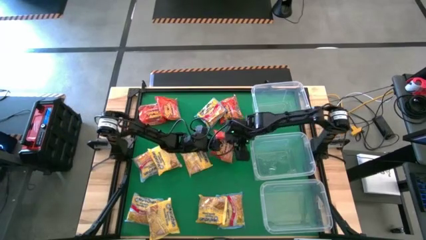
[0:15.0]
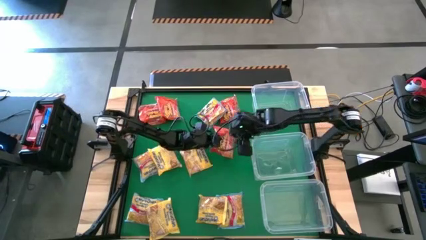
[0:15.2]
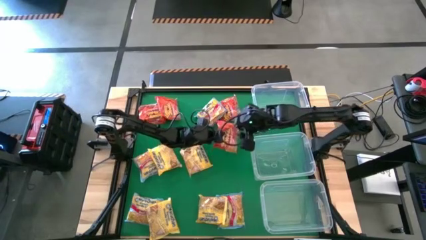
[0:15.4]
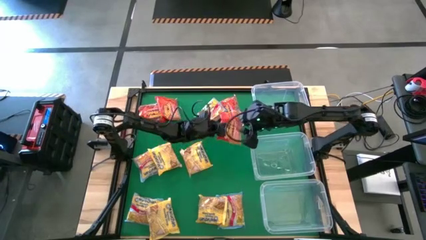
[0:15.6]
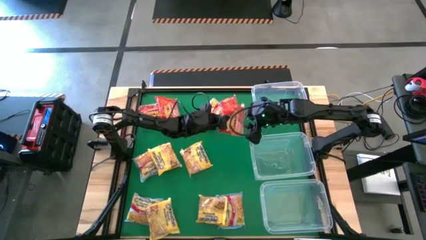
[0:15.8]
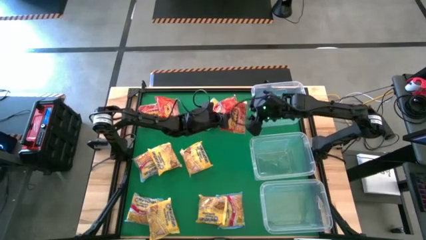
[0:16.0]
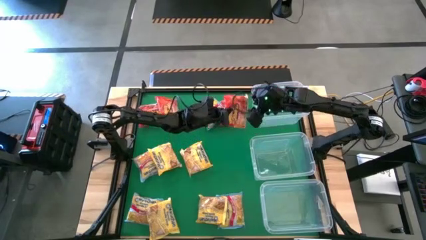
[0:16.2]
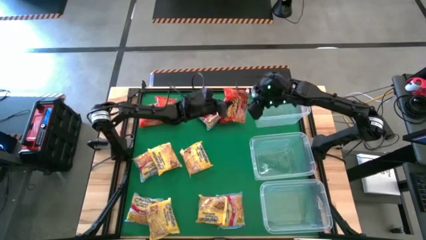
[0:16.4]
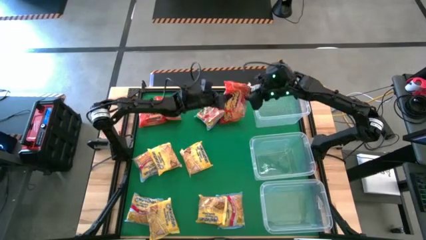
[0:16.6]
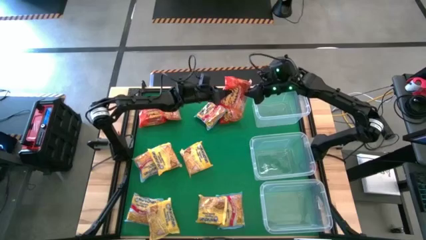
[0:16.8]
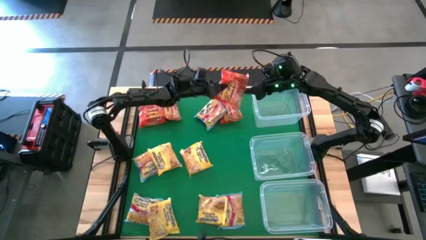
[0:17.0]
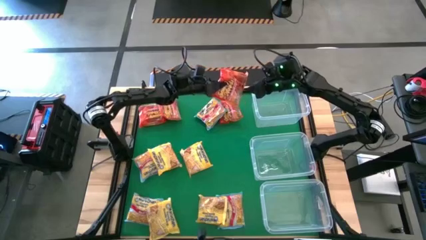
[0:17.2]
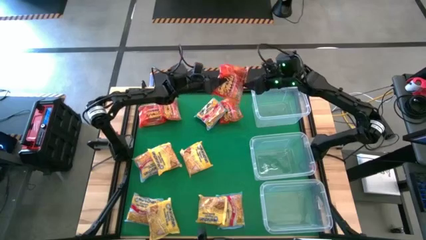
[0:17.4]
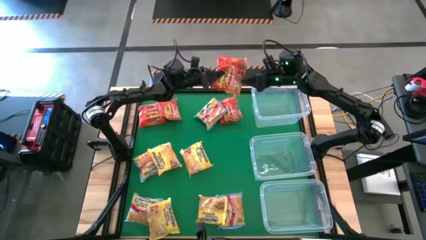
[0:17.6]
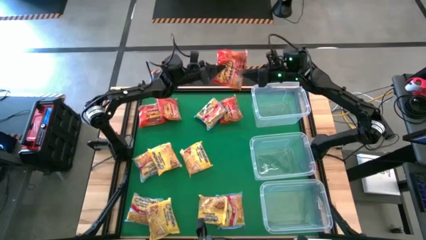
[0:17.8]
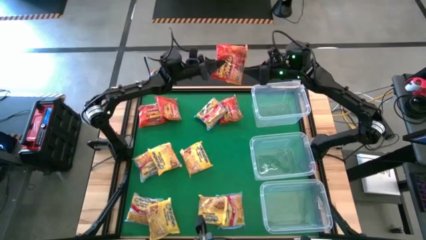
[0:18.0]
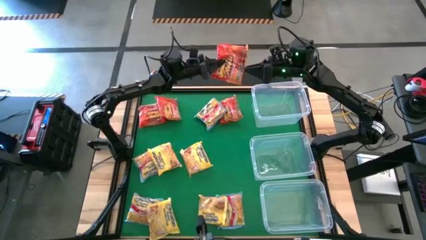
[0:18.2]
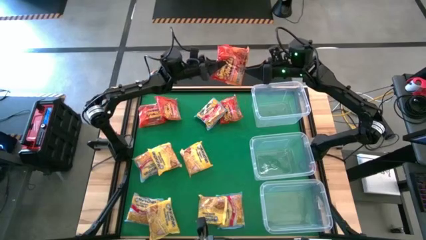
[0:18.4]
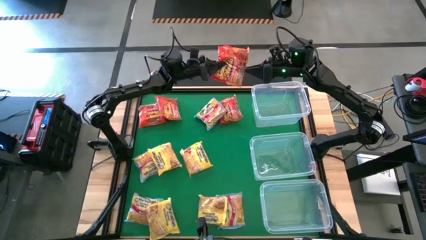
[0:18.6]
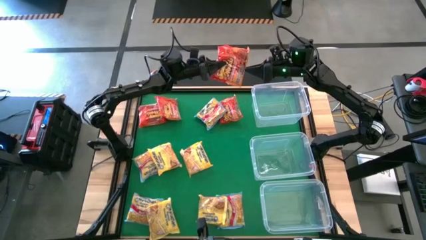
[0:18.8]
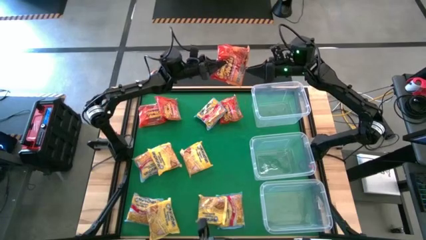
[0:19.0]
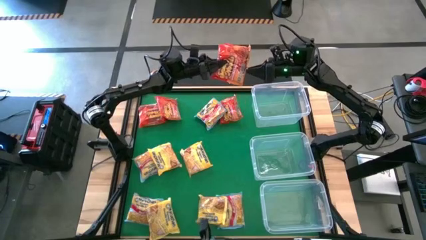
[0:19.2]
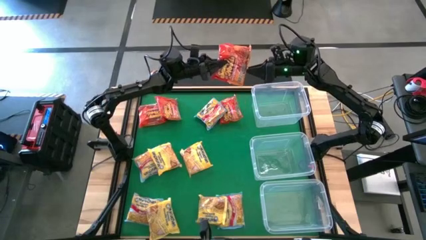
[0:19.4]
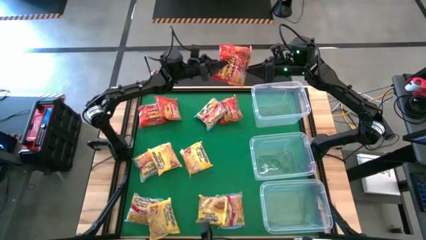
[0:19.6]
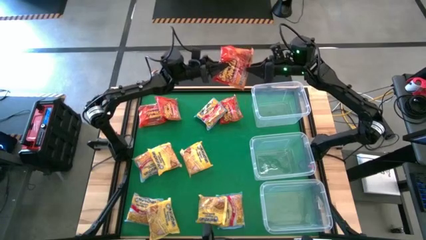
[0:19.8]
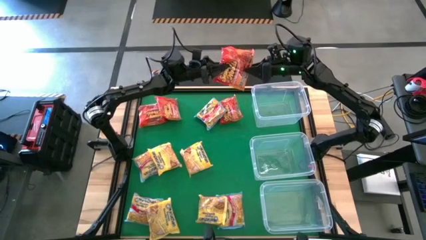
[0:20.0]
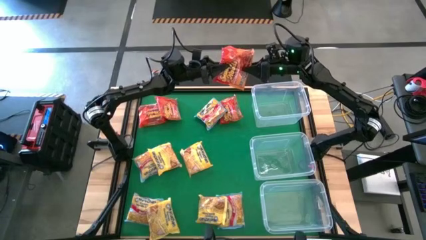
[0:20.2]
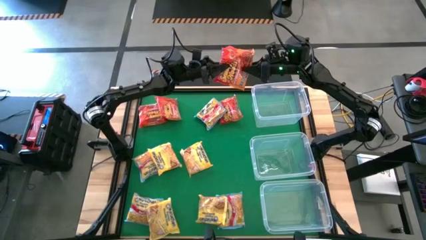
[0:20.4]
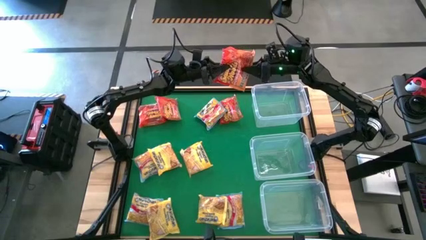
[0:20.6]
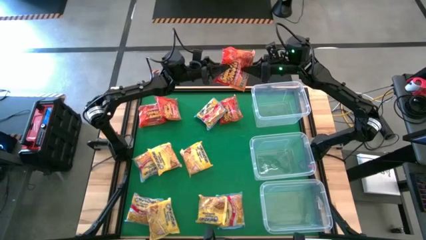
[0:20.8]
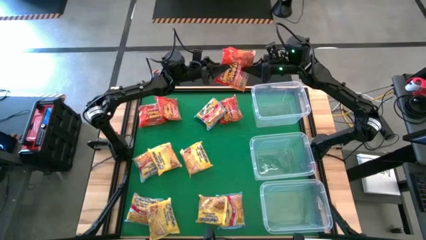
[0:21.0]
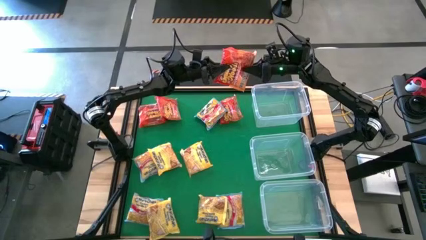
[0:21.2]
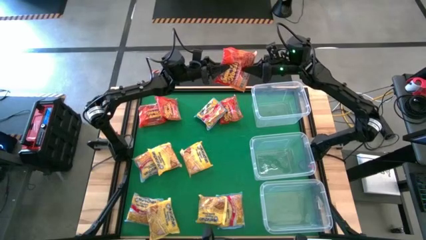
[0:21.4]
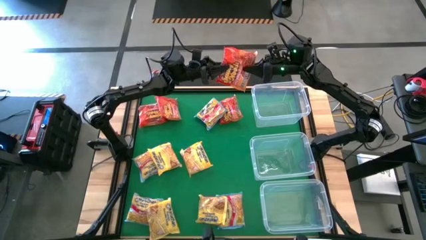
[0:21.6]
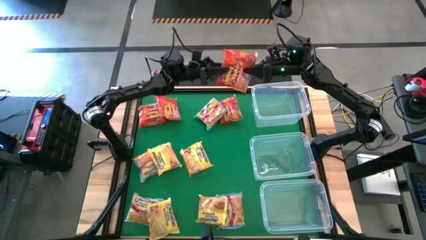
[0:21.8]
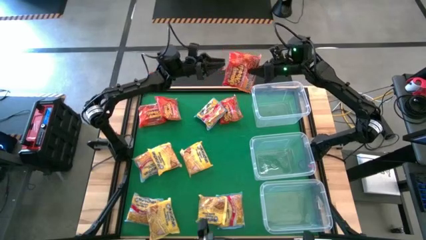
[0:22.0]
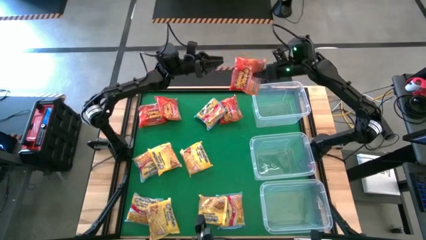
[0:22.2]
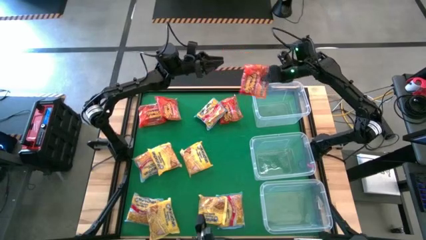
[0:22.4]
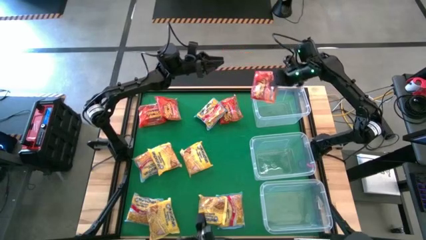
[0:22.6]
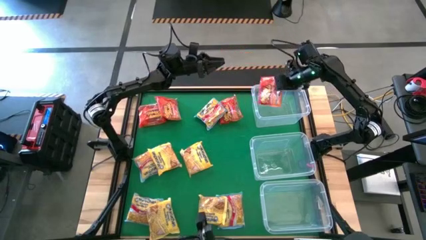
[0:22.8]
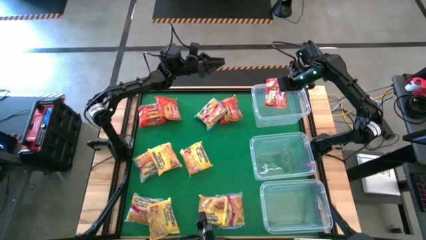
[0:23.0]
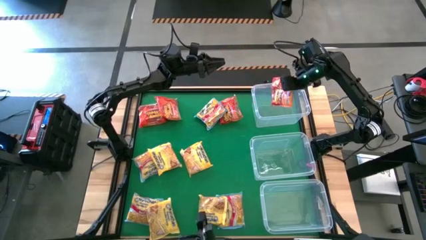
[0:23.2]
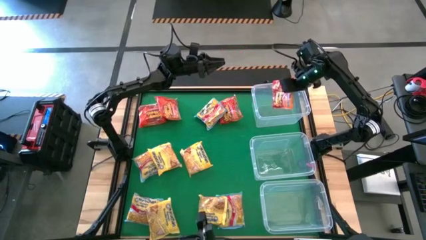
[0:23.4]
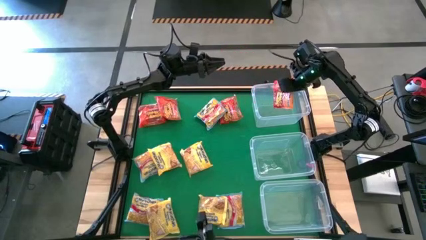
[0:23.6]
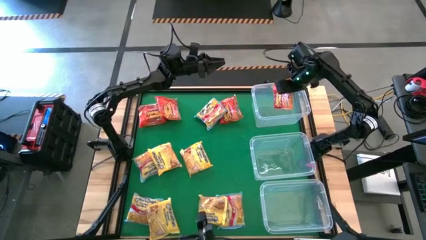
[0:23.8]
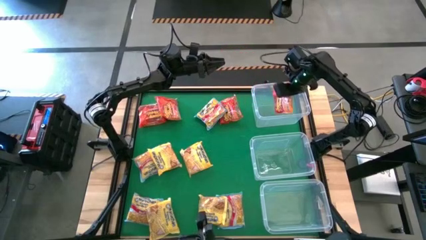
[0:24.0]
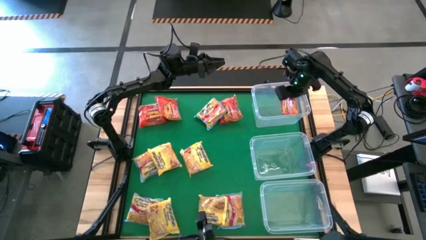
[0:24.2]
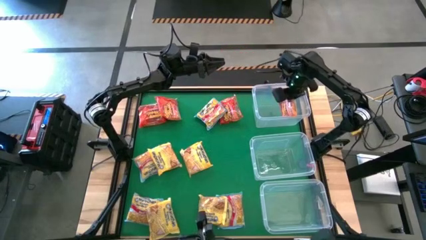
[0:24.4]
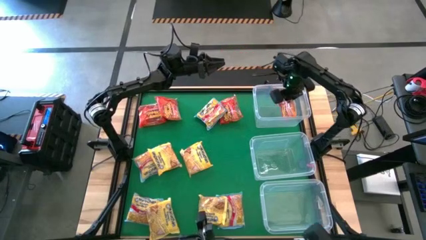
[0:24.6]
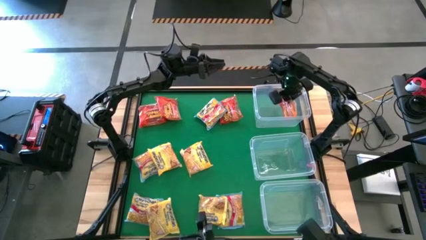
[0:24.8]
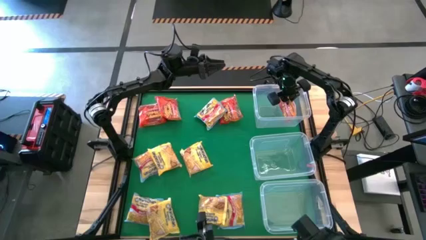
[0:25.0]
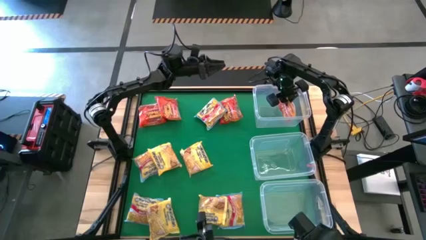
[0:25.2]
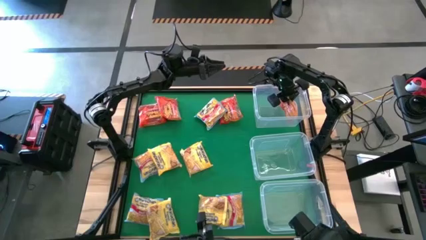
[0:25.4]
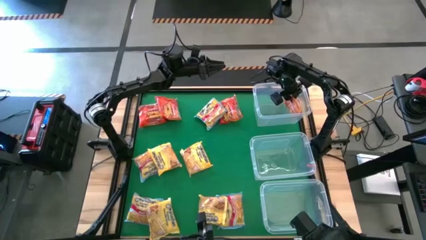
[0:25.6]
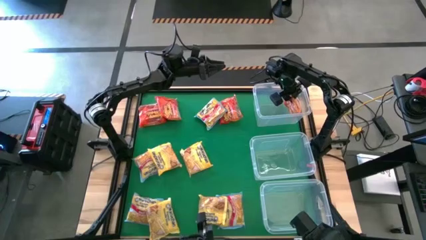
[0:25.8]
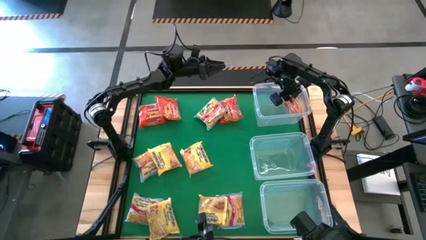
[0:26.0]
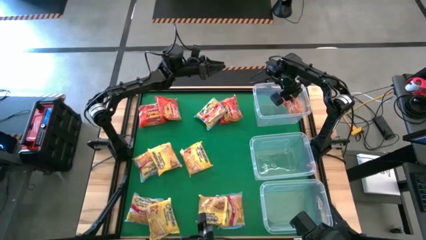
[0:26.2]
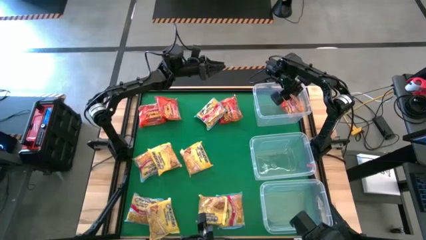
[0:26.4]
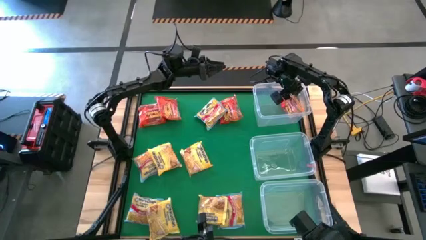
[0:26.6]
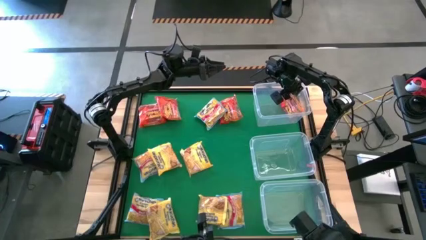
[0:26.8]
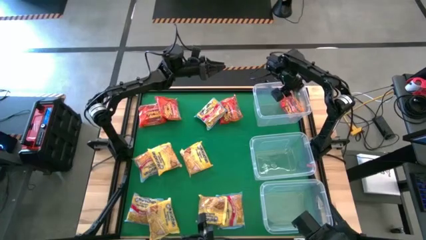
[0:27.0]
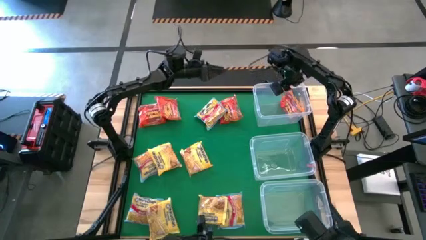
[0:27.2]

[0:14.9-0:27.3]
Task: Sort Maruchan noodles
Put the bottom red noodle pack into the top transparent bin
